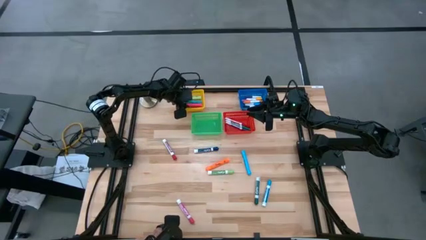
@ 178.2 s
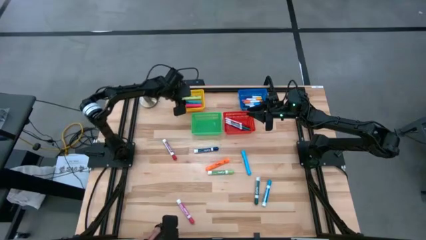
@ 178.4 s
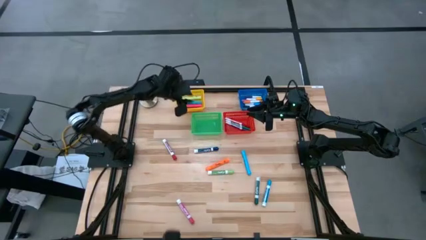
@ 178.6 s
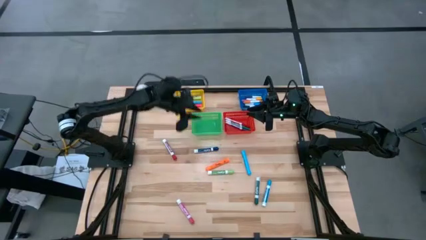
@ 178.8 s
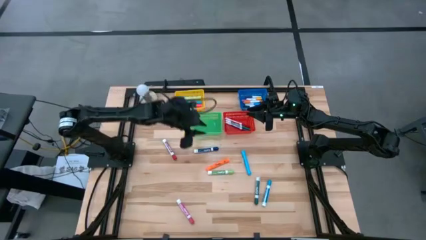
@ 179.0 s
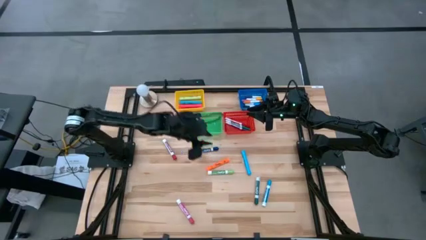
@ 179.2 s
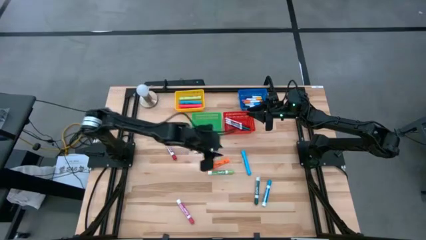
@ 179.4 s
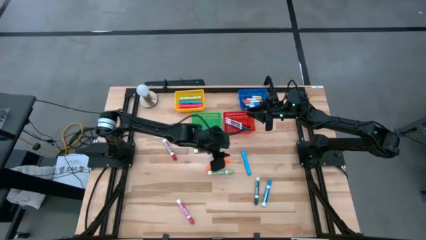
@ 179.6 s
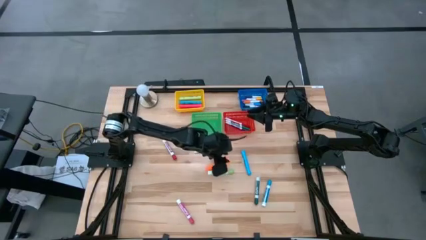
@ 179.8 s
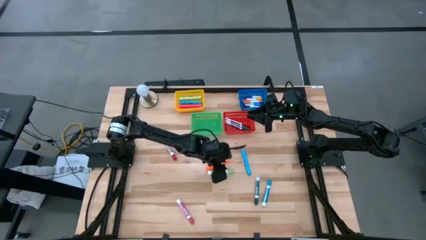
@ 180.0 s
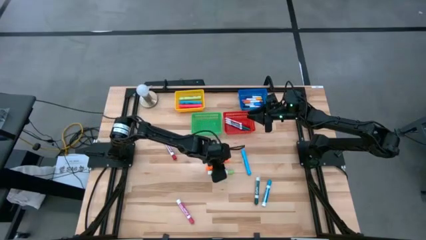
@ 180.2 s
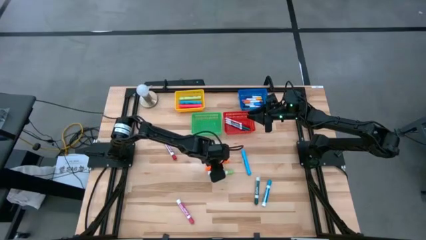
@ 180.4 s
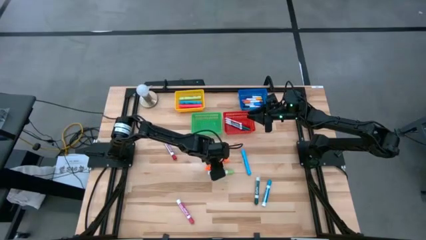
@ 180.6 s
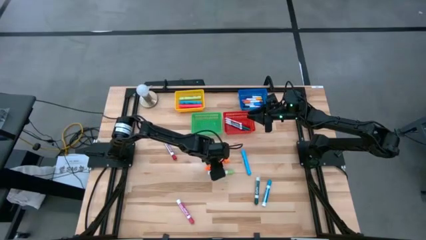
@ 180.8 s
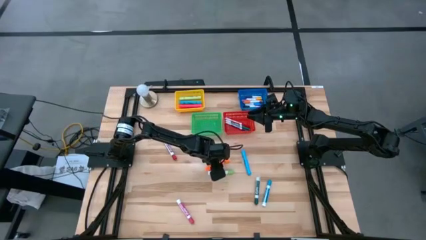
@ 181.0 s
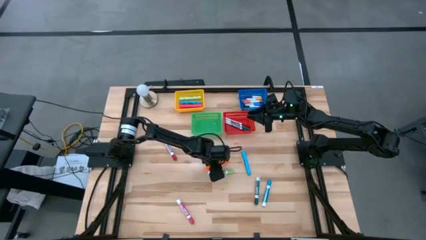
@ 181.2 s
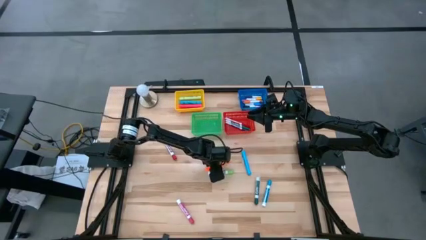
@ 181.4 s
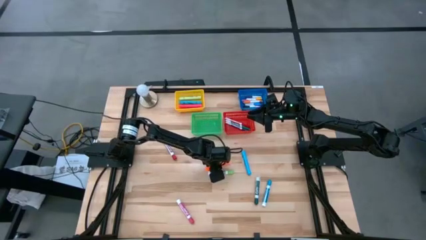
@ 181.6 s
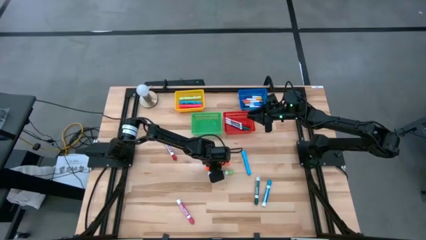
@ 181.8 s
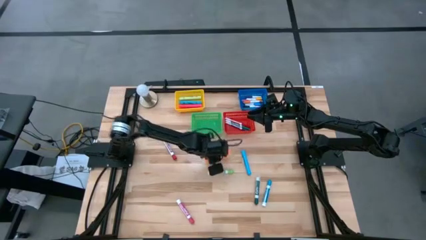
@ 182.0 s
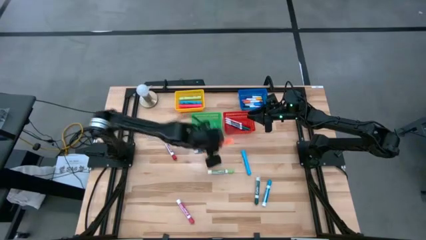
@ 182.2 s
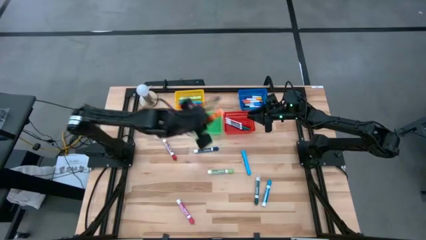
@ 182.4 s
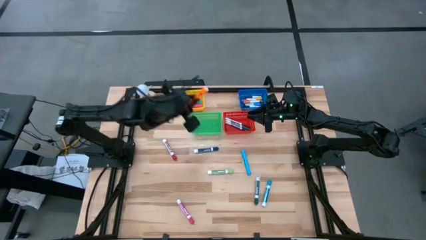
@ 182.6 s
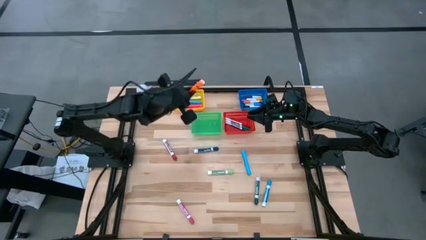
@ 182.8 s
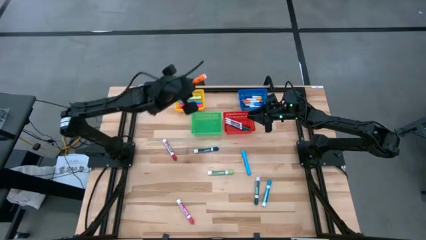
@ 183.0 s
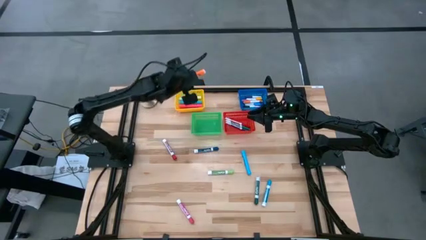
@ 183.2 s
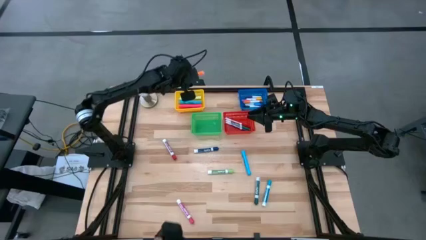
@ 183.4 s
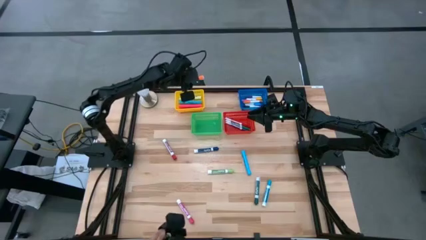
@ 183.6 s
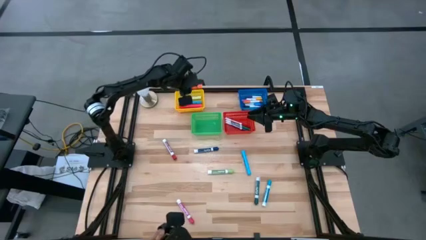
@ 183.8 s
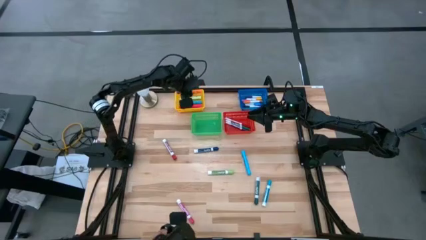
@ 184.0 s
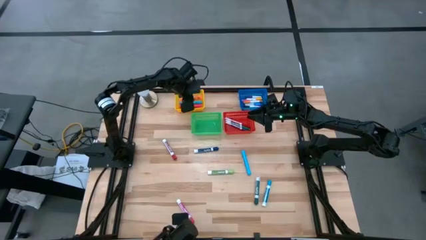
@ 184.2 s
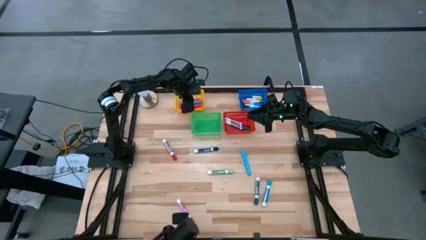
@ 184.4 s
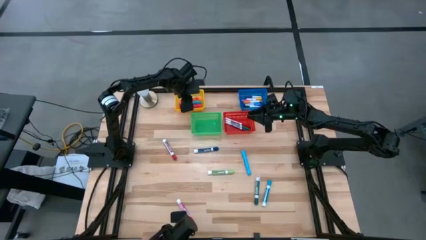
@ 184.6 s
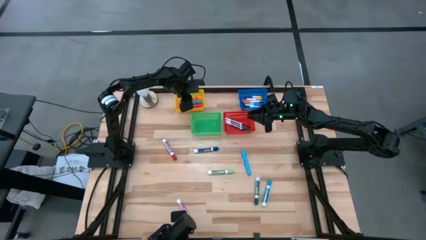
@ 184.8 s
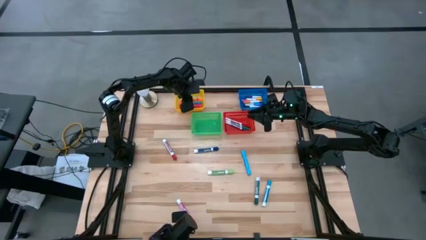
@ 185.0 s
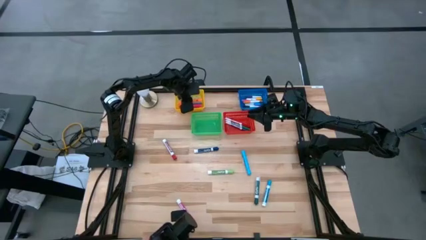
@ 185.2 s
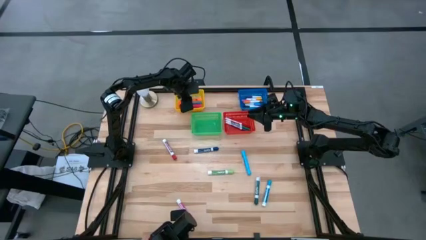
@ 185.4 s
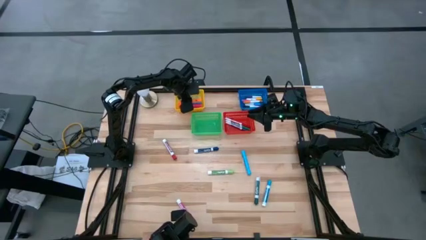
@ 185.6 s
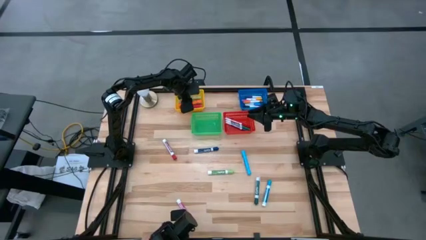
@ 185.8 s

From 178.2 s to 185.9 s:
Task: Pick & Place Markers
Put the orange highlighter into the yellow bin

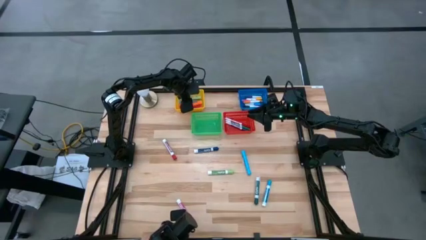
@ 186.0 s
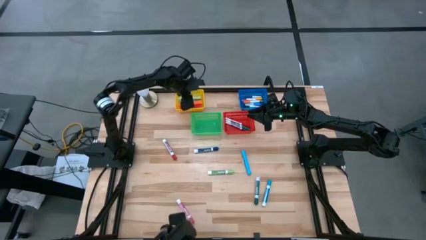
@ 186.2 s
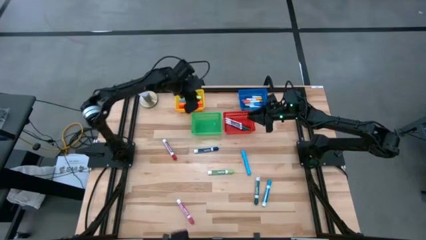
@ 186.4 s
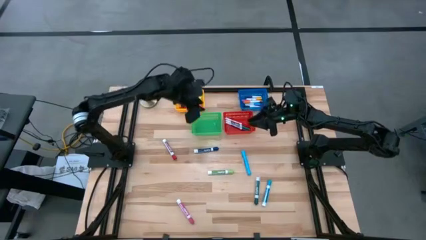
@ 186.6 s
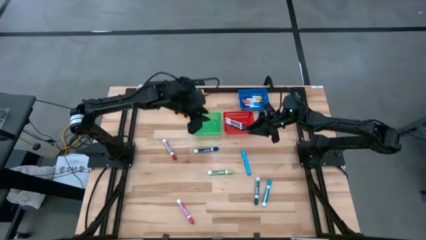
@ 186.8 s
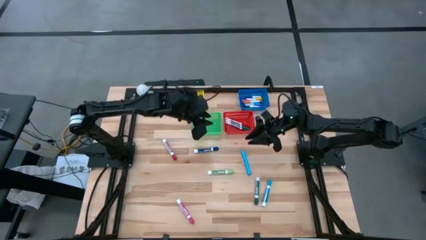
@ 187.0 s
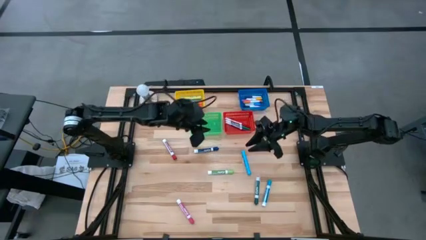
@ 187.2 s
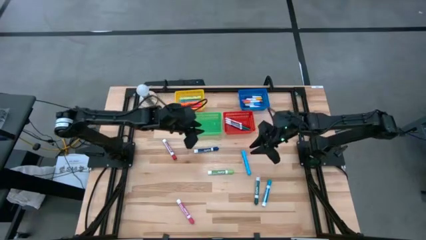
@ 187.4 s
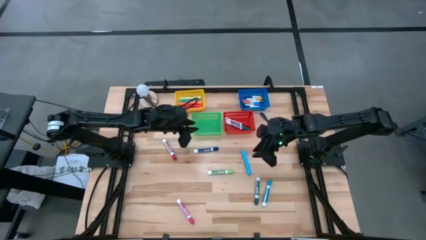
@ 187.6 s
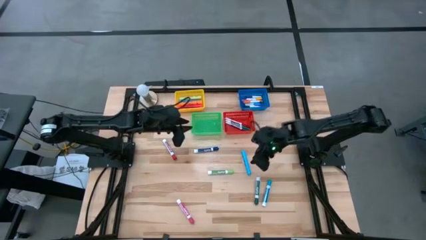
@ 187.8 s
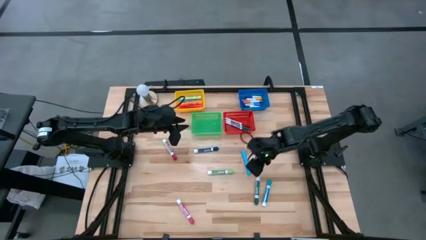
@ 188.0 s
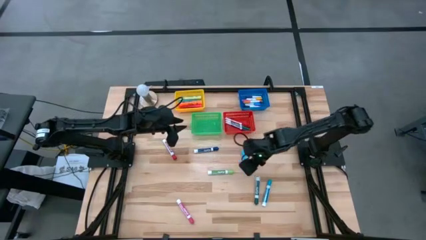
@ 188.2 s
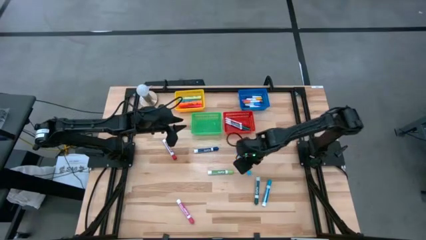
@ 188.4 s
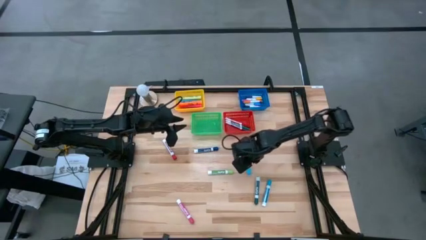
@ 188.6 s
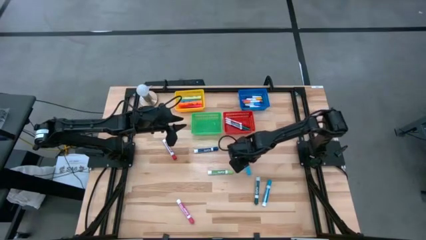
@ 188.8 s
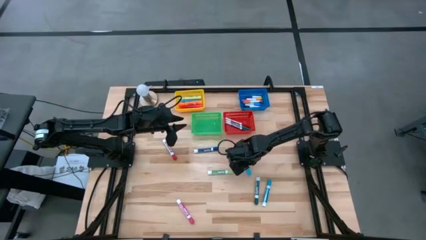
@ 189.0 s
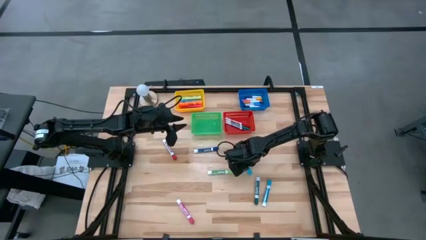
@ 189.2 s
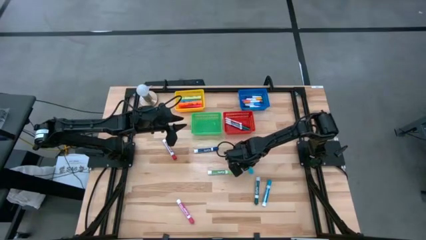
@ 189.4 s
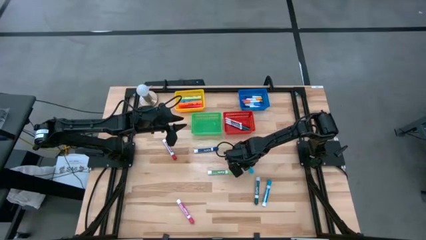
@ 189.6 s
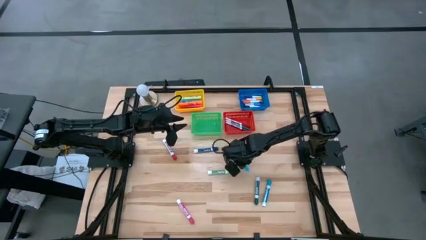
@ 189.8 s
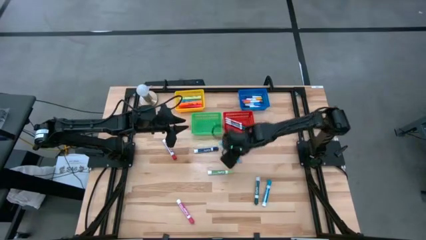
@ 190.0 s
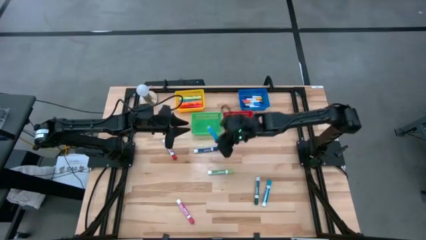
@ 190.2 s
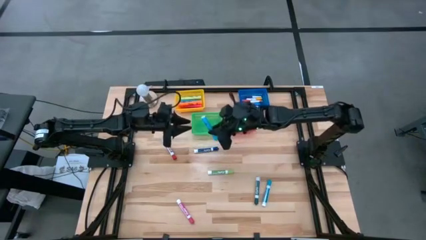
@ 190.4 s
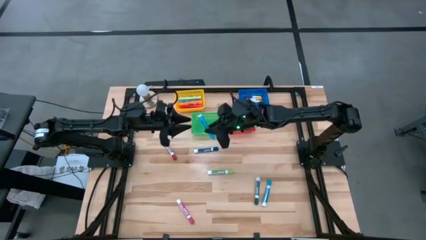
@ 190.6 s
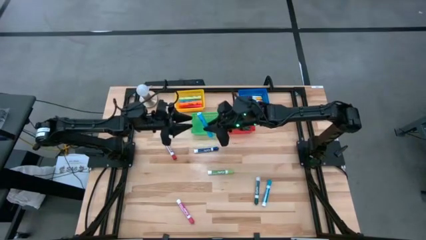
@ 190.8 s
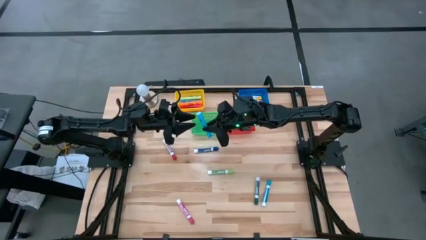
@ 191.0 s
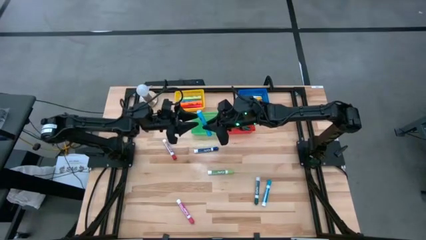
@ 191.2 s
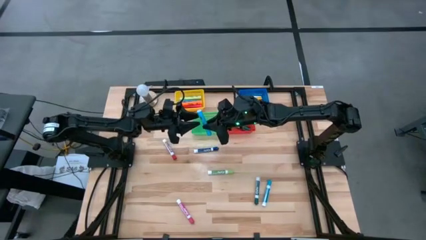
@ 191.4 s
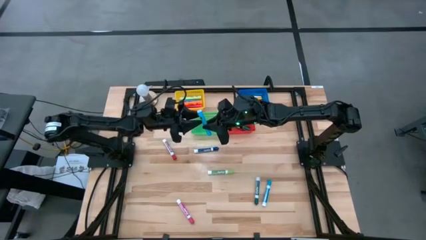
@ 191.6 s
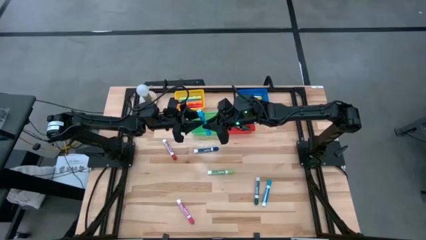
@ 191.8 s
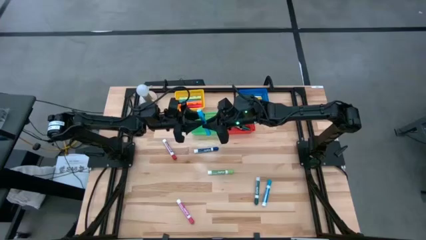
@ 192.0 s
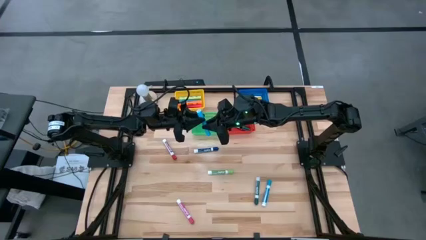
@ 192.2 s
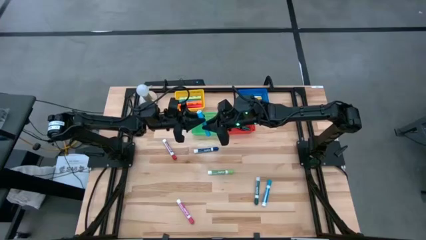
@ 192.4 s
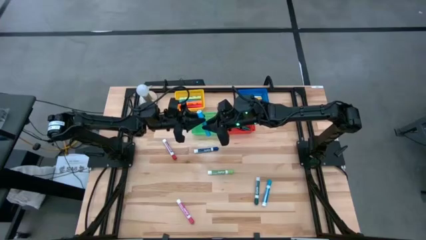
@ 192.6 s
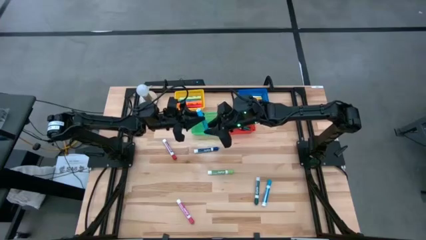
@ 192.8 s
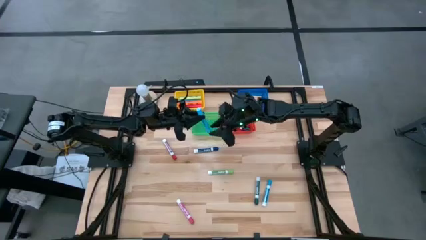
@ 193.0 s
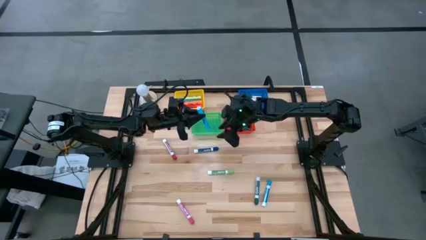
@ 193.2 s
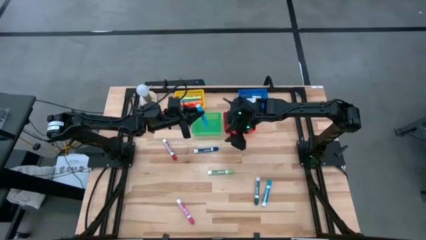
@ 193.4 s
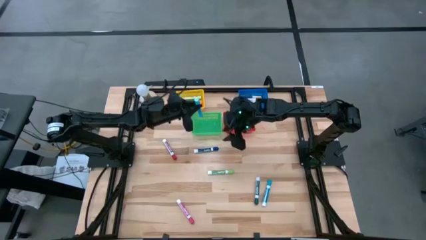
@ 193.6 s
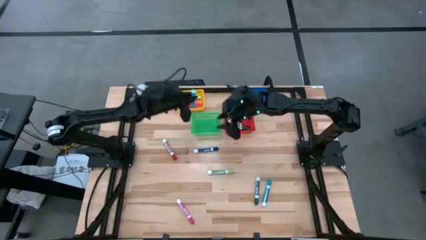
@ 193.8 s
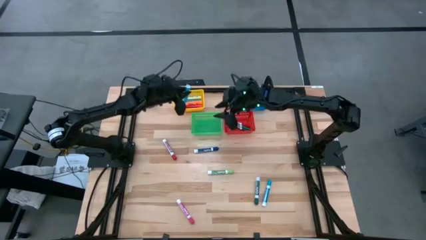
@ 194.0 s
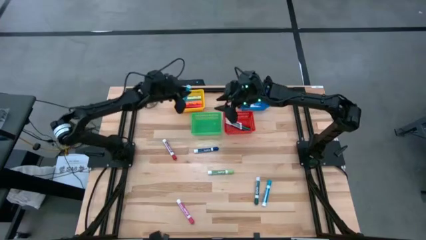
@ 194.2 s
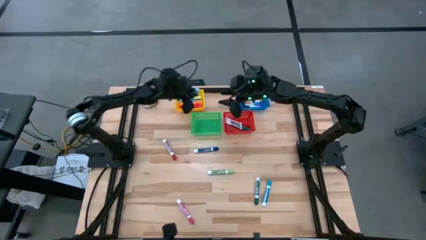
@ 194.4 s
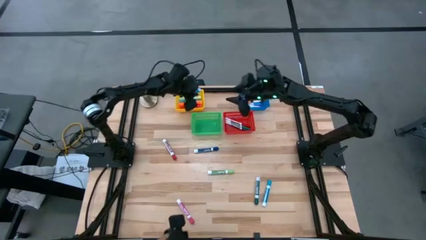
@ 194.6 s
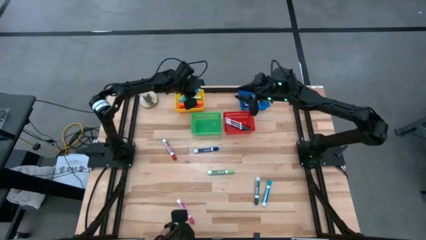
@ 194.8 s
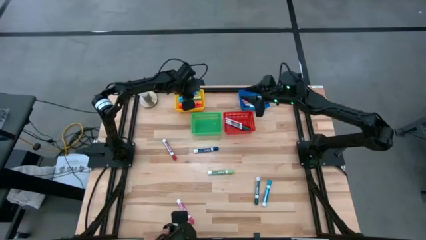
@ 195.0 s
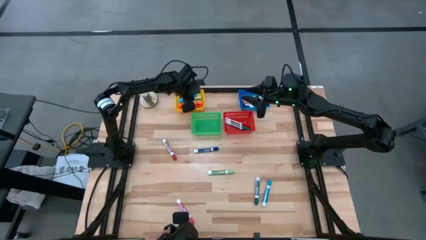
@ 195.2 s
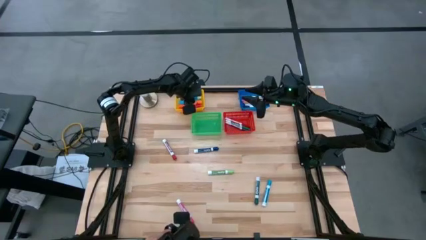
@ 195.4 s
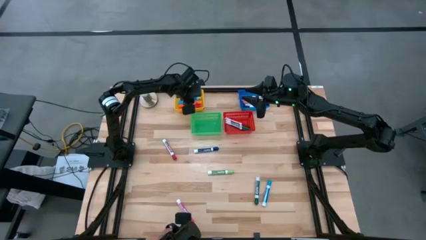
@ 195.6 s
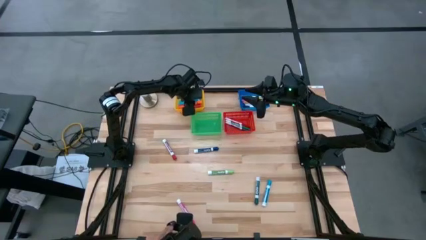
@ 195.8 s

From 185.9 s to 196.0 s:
Put the blue highlighter into the yellow bin
